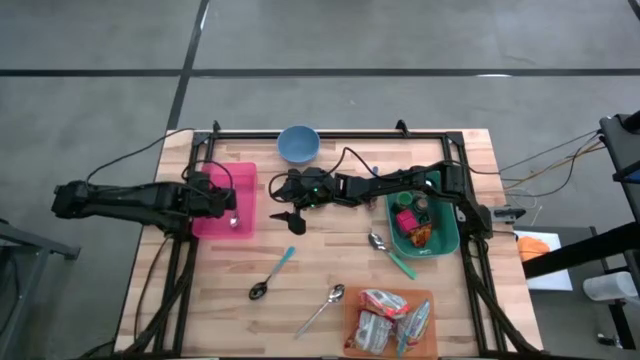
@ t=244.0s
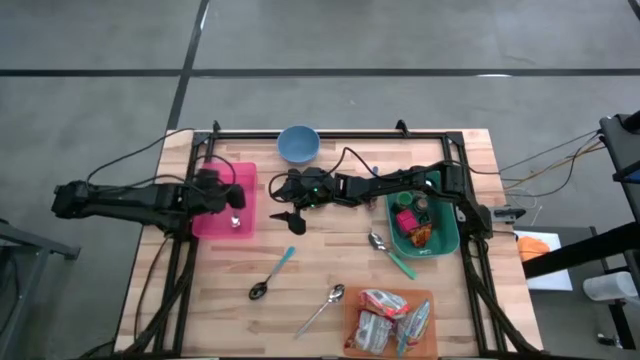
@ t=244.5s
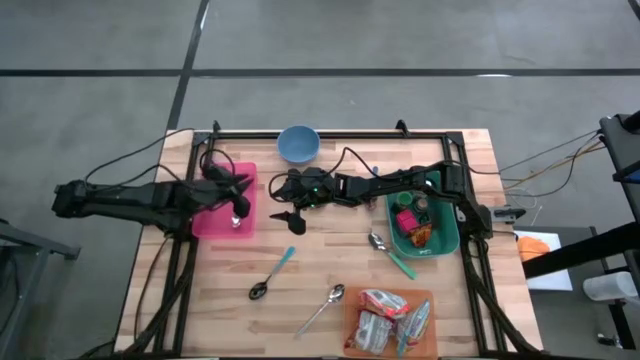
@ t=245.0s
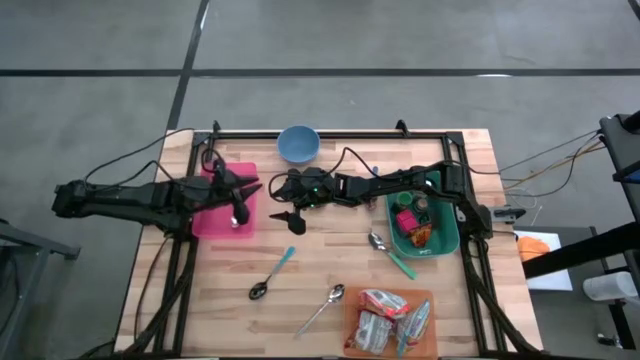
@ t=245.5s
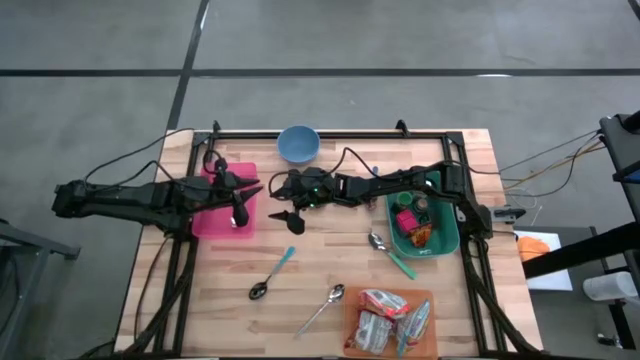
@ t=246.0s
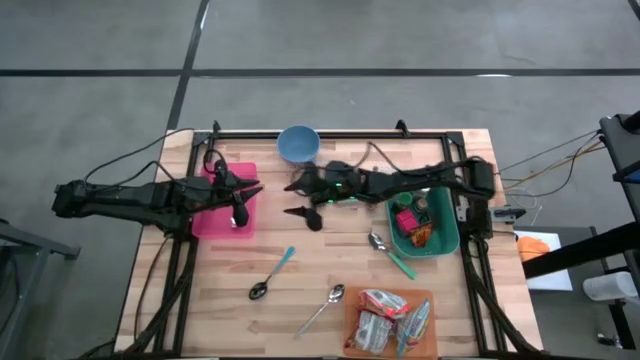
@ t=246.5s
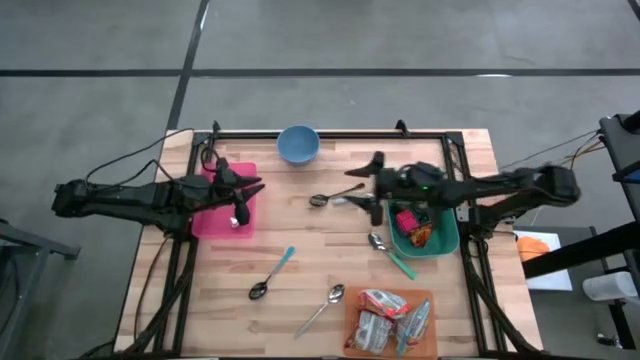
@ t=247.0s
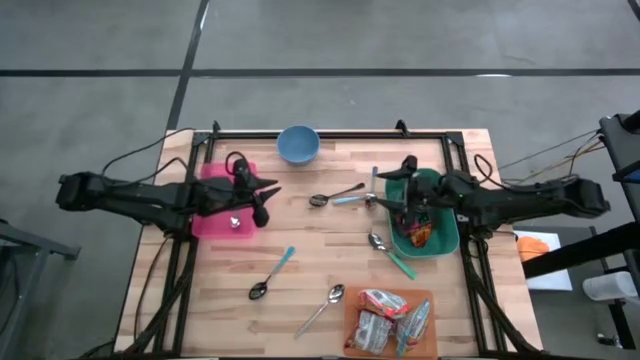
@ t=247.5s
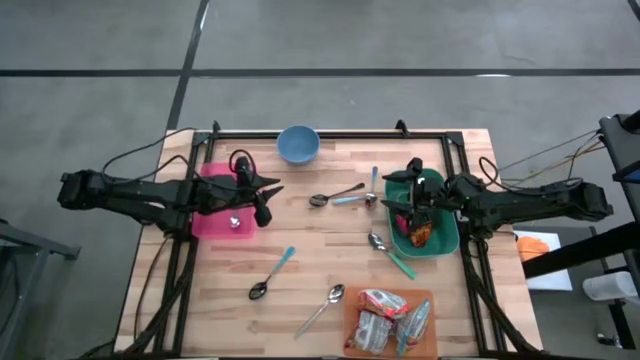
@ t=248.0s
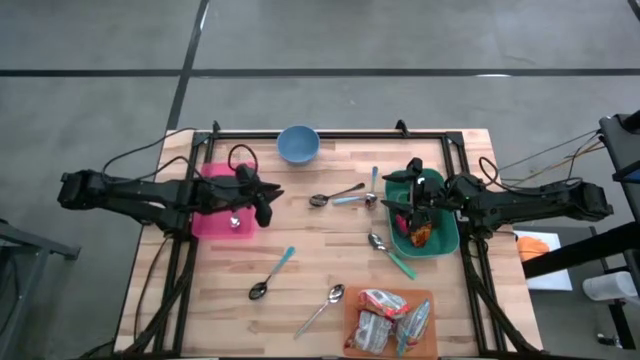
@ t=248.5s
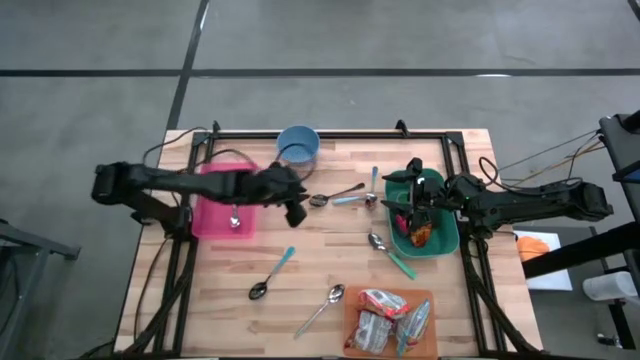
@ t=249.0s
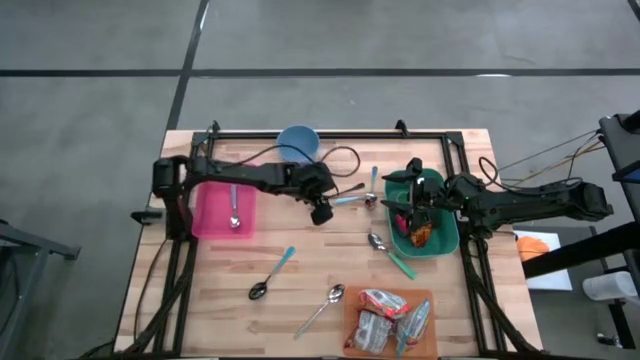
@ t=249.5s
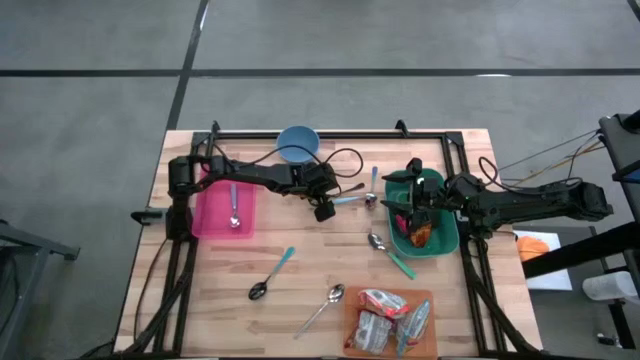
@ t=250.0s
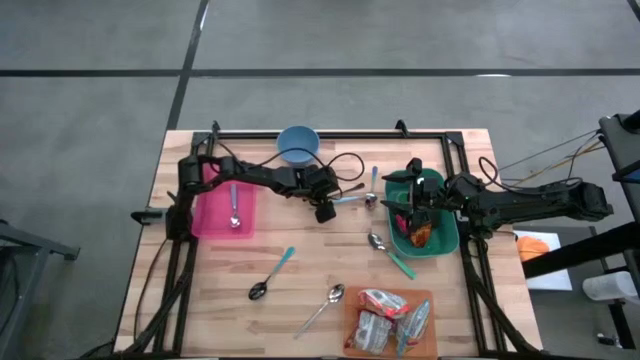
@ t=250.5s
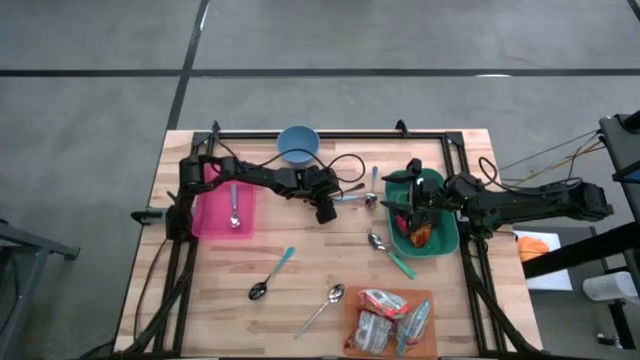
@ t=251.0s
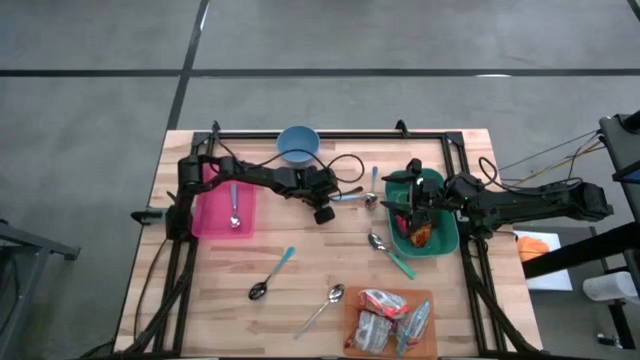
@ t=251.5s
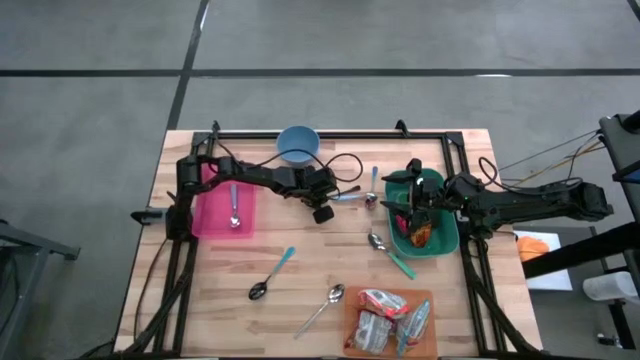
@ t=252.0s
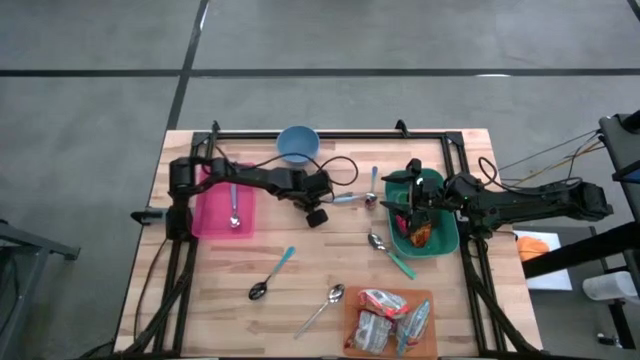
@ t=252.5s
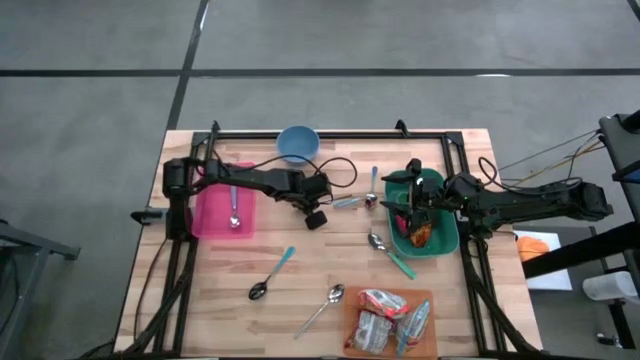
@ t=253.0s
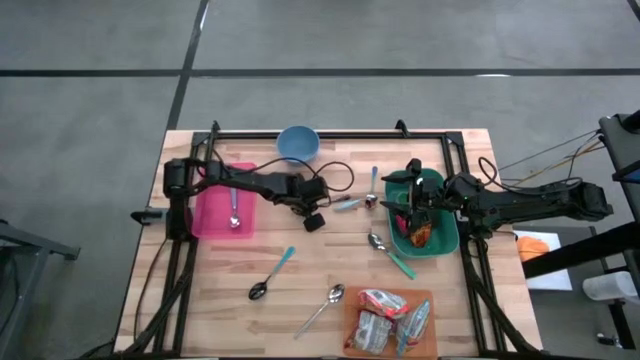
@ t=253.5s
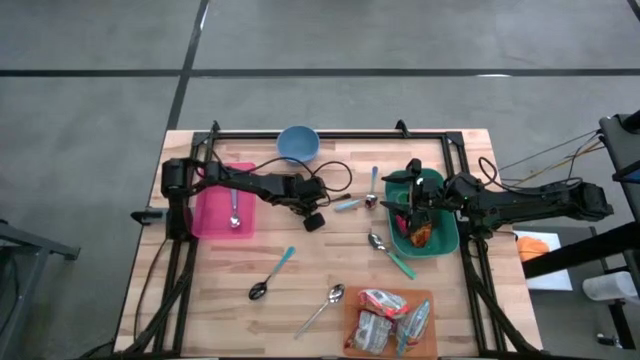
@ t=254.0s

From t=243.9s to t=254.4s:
Put the black spoon into the pink bin

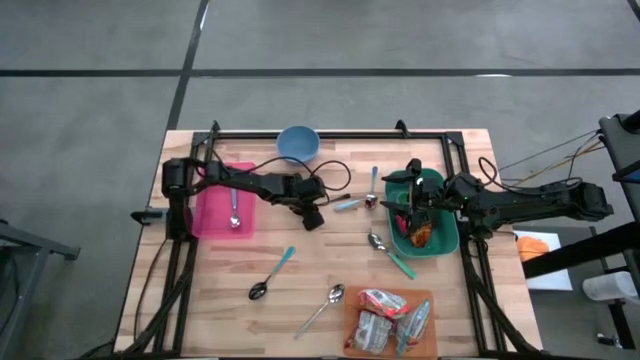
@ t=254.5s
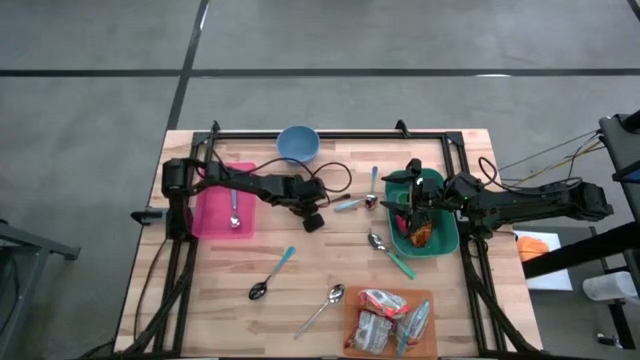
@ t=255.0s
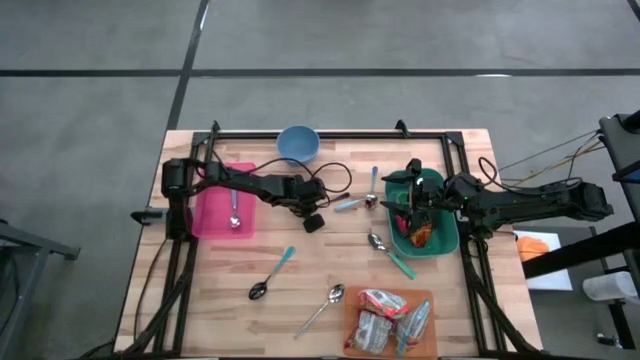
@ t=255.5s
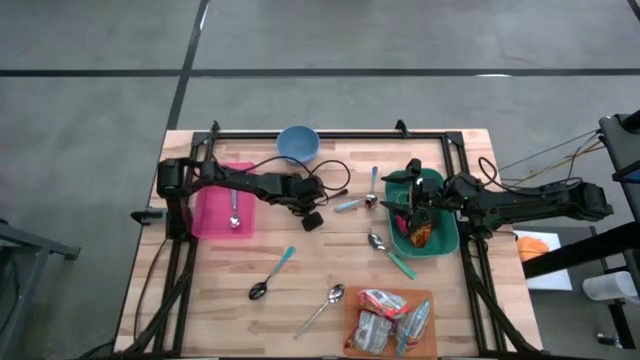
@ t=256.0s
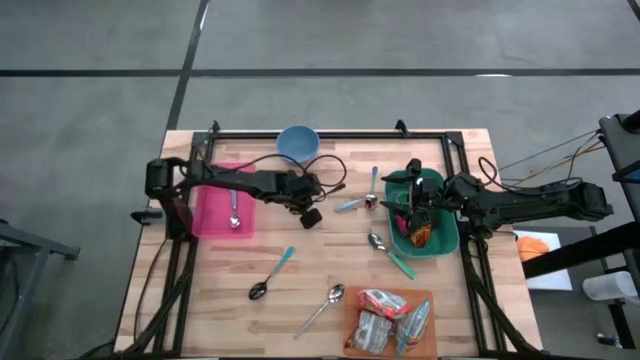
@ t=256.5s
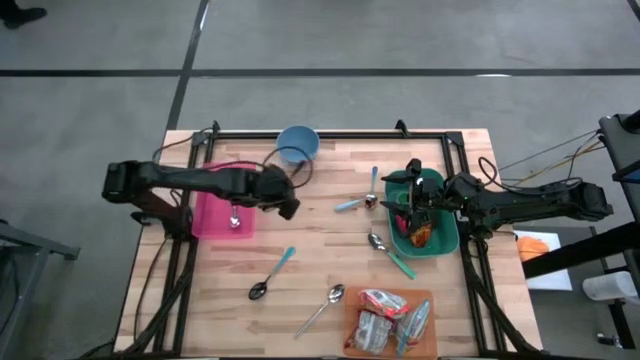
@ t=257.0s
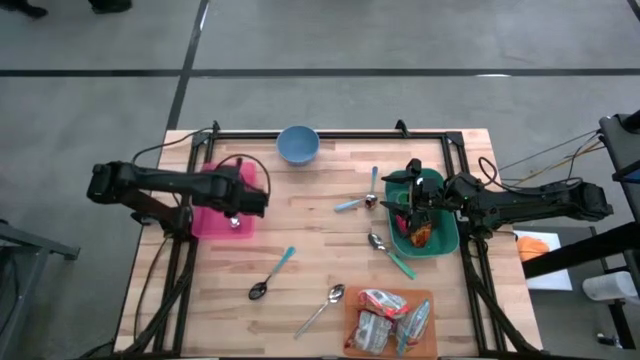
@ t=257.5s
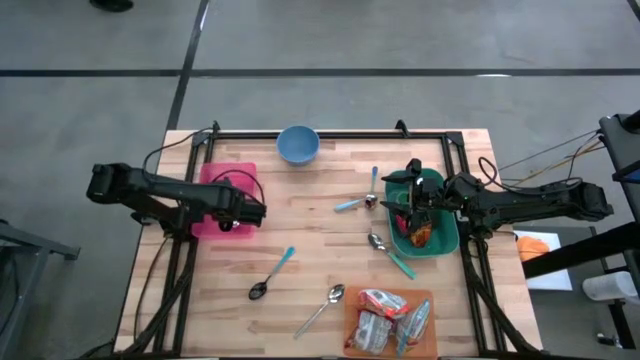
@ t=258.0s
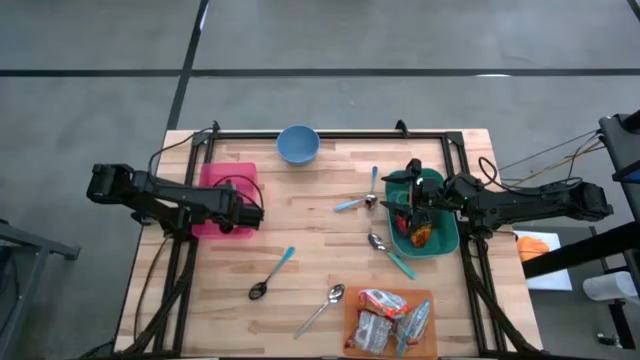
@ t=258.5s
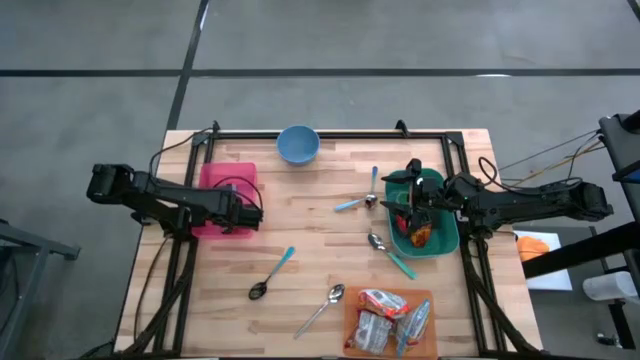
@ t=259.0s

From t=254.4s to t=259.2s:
Put the black spoon into the pink bin

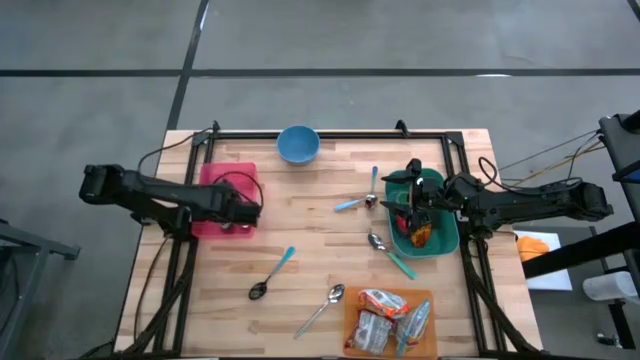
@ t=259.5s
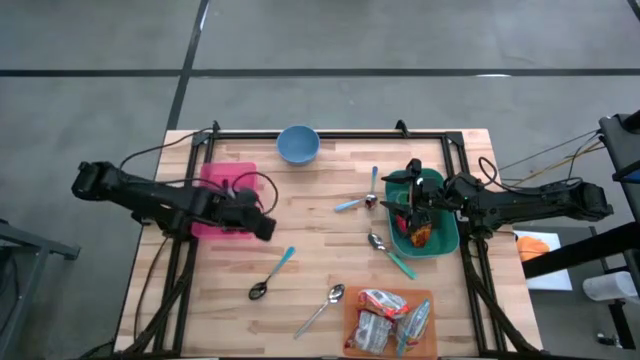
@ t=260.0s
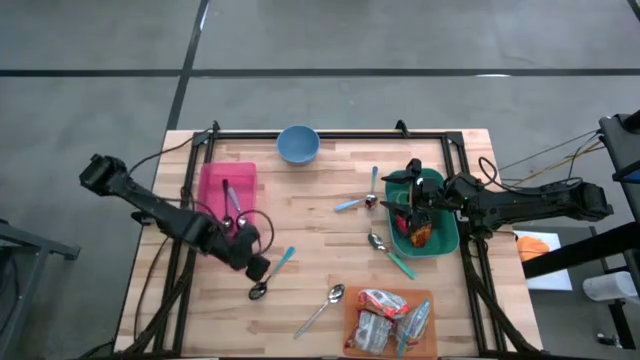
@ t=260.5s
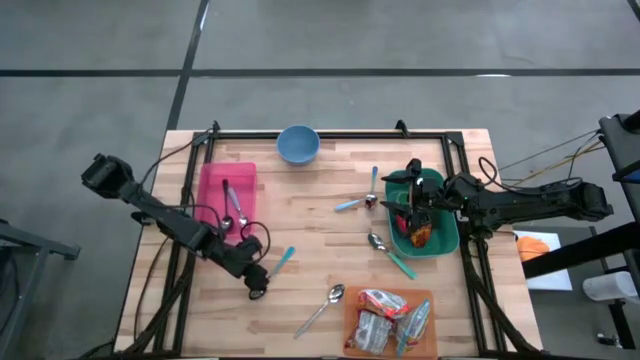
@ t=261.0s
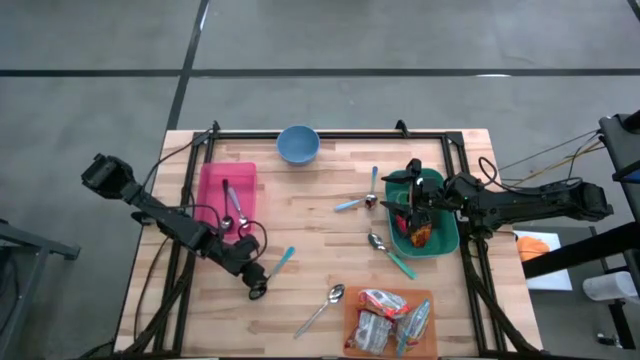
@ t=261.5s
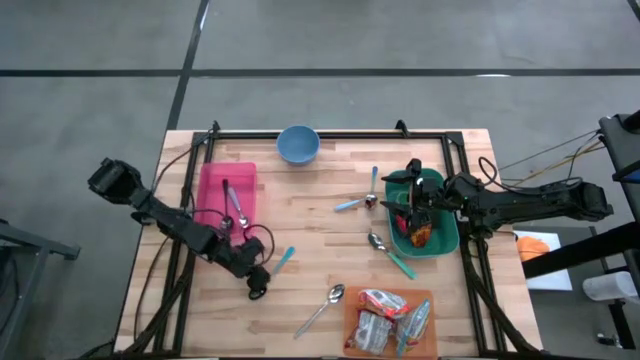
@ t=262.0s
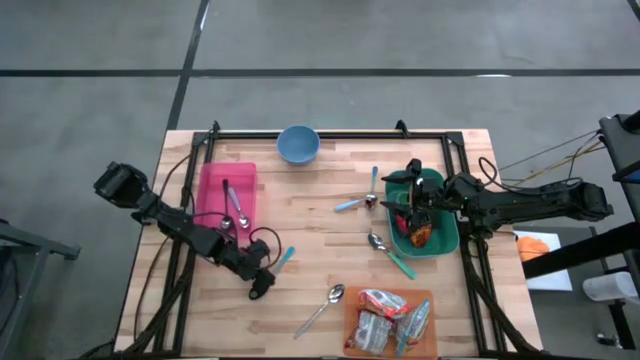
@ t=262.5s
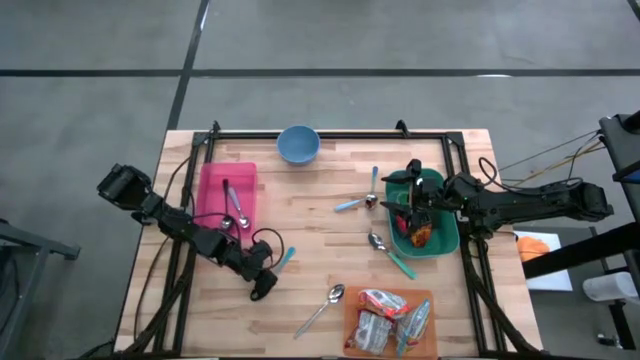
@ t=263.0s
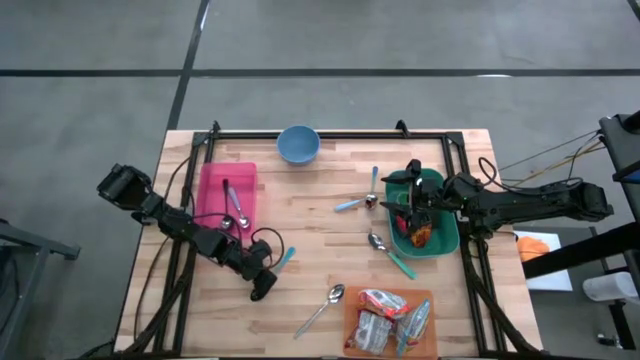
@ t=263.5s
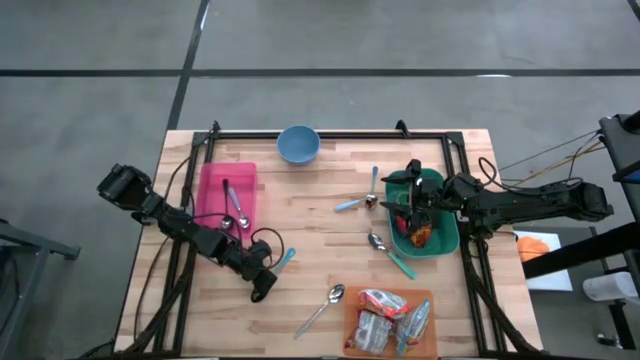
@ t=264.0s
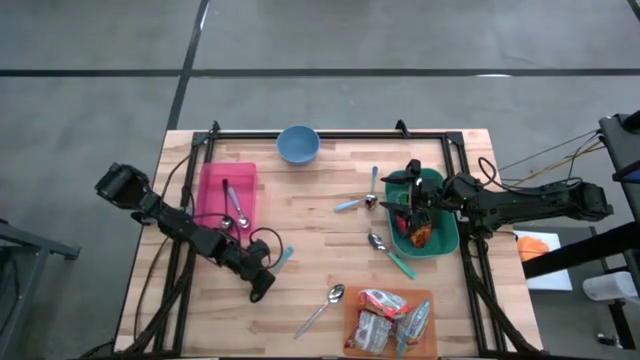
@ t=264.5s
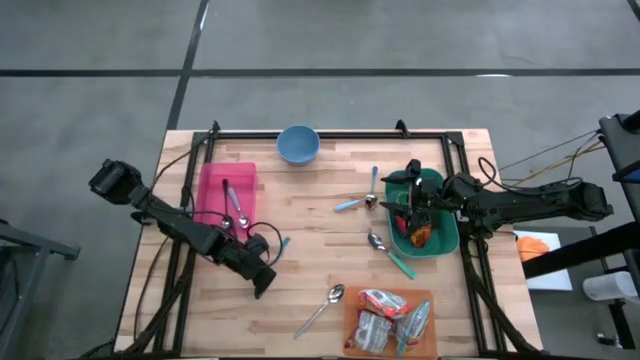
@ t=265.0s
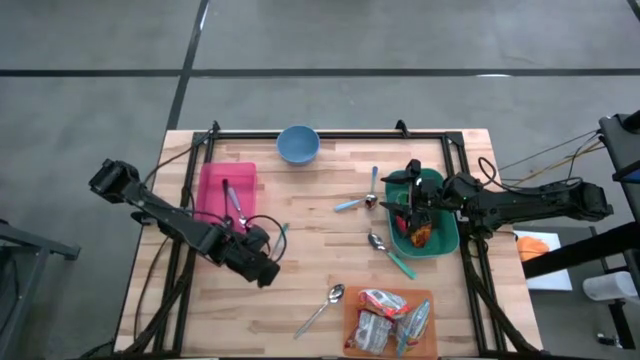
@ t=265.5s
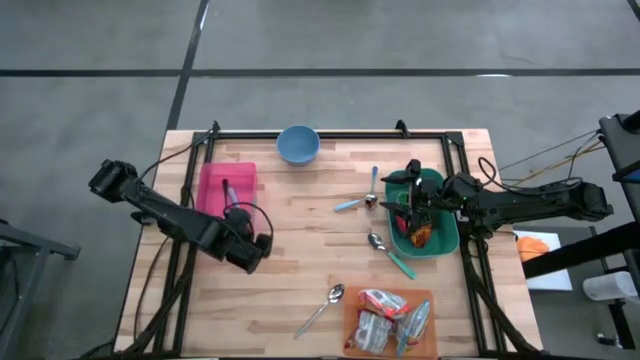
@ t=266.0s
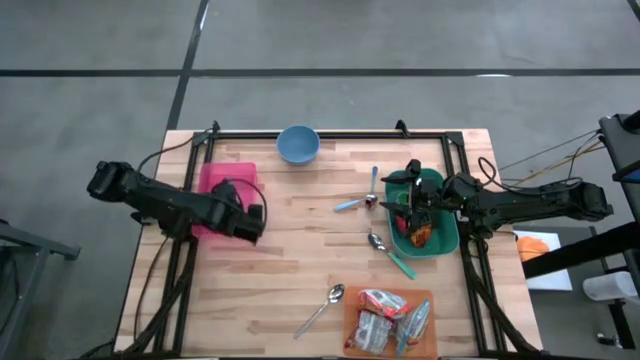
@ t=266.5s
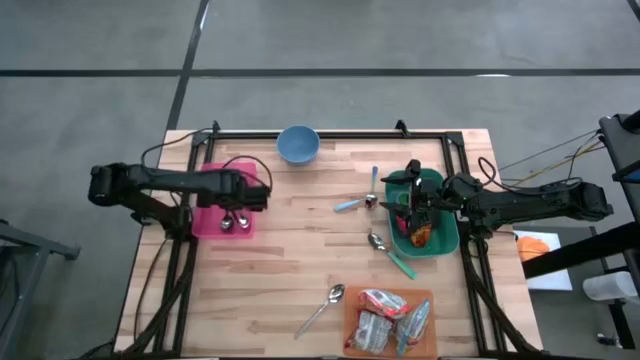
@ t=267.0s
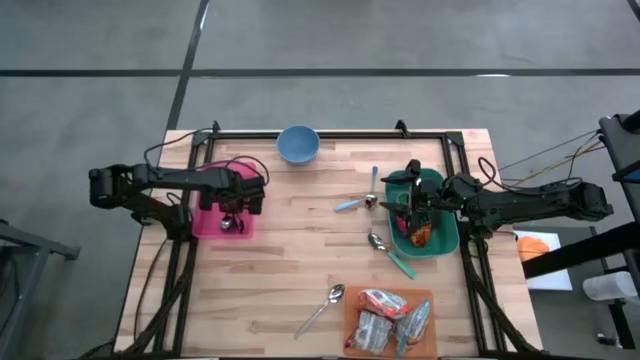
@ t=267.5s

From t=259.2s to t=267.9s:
Put the blue spoon into the pink bin
